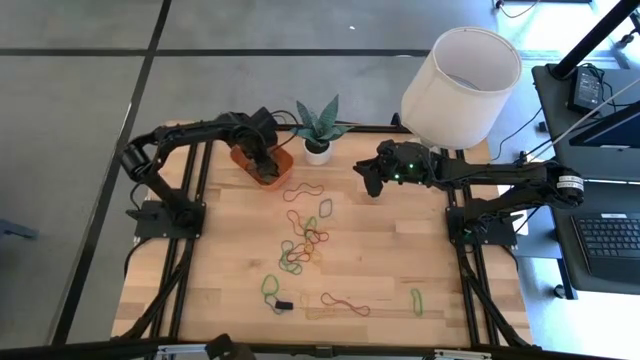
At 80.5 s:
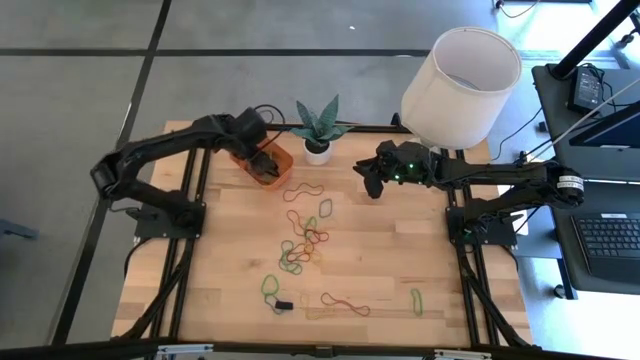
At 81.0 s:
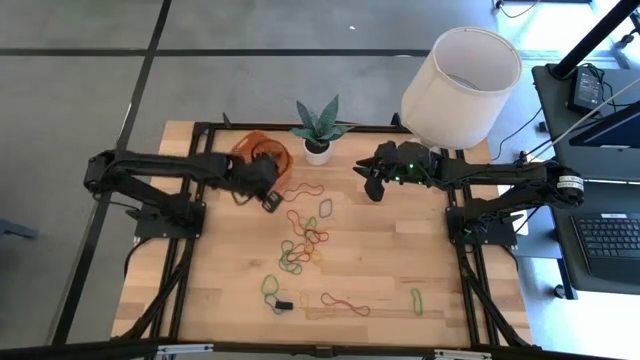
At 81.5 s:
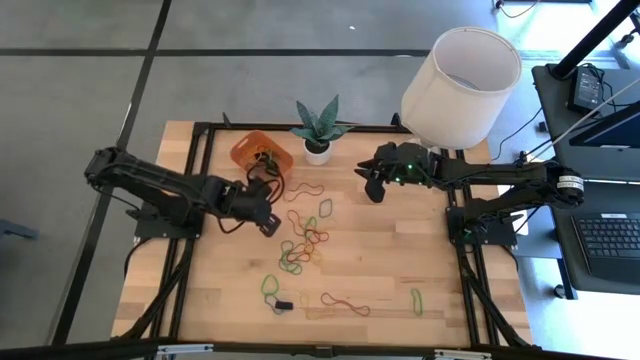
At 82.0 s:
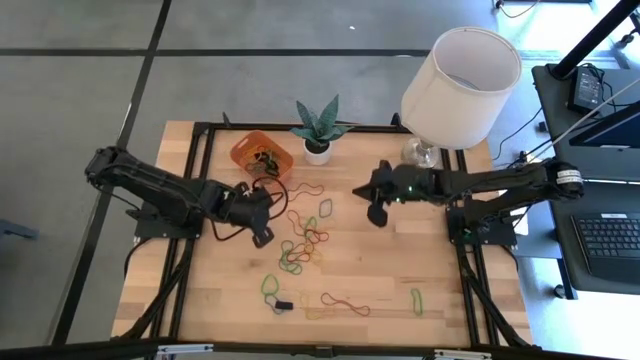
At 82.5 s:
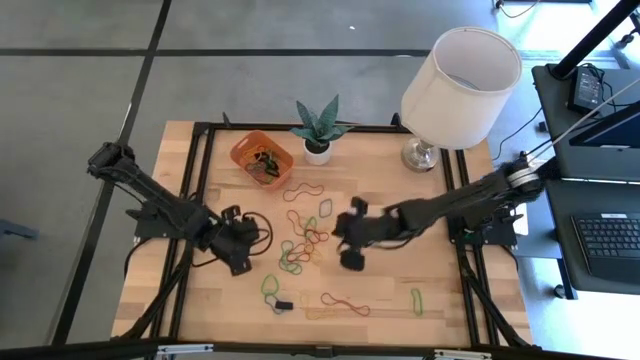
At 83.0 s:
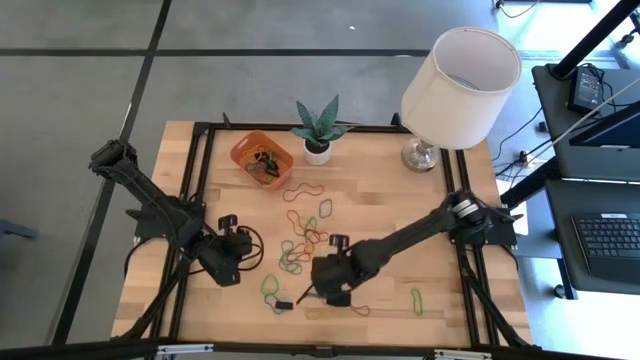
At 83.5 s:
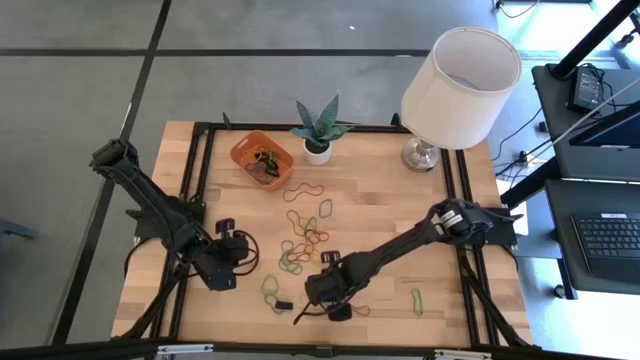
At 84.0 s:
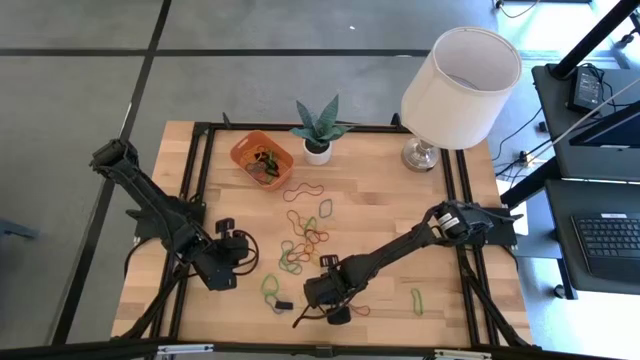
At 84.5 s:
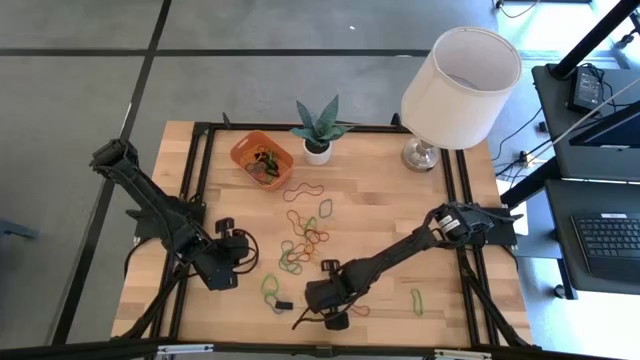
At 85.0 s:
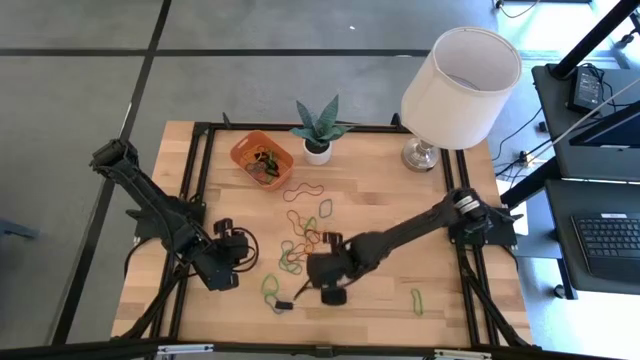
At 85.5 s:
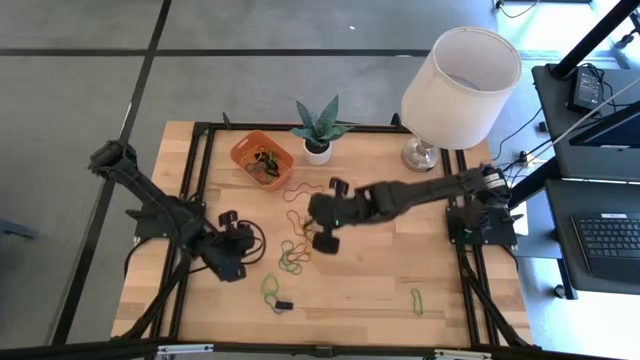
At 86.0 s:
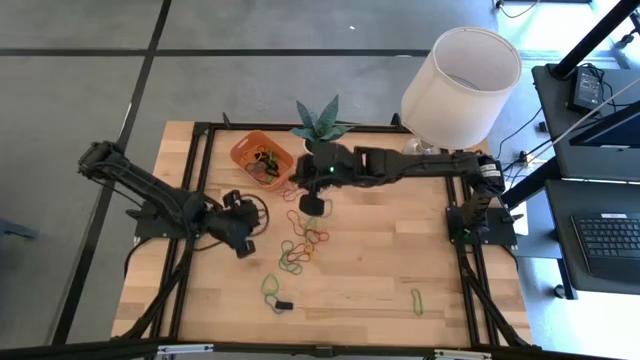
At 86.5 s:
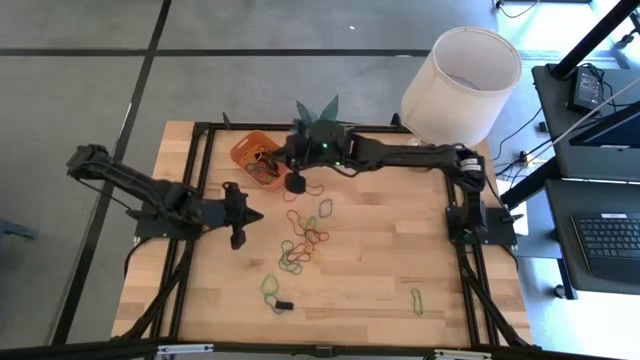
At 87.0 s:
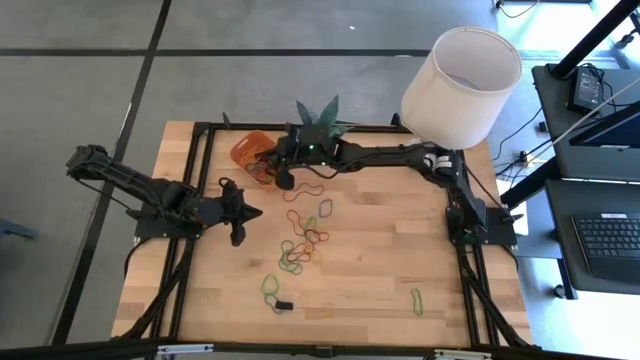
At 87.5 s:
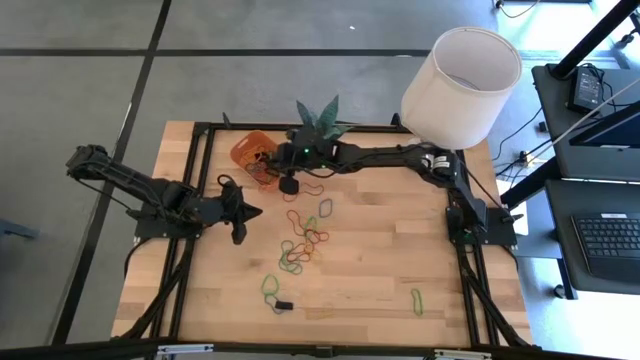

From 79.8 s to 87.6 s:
Task: Pick and place rubber bands into bin
Put the red rubber band into the orange bin

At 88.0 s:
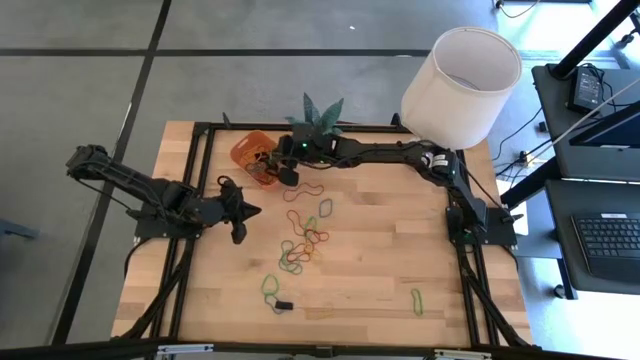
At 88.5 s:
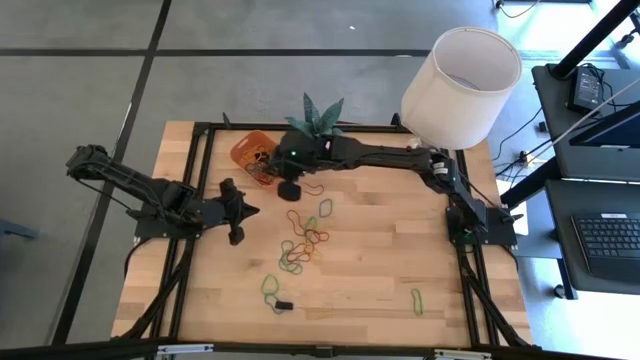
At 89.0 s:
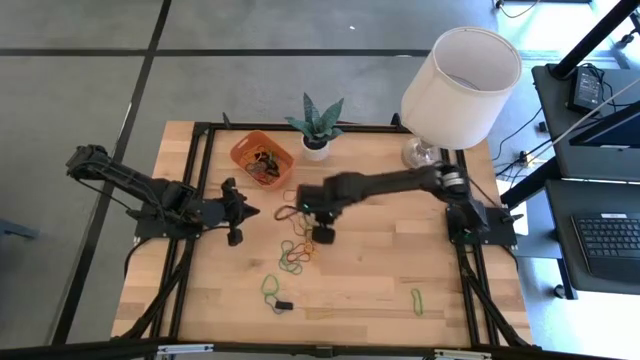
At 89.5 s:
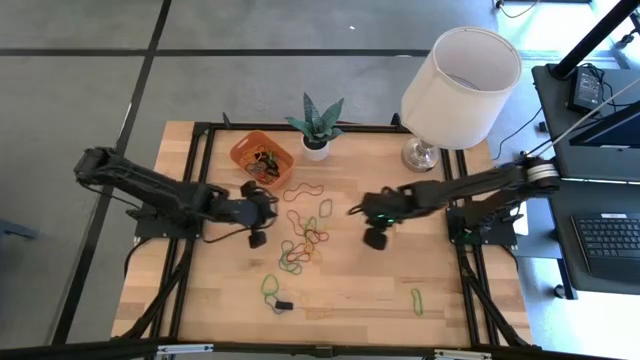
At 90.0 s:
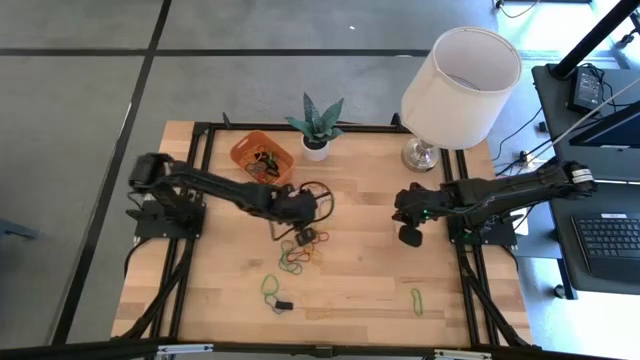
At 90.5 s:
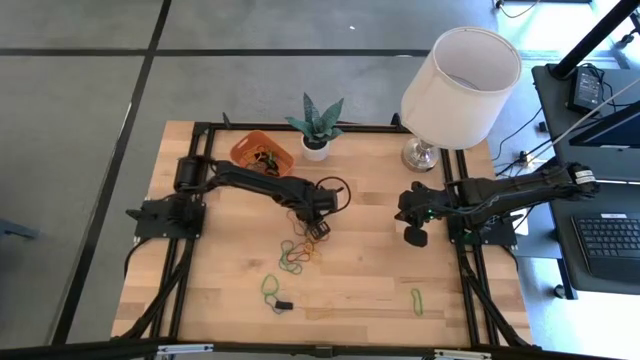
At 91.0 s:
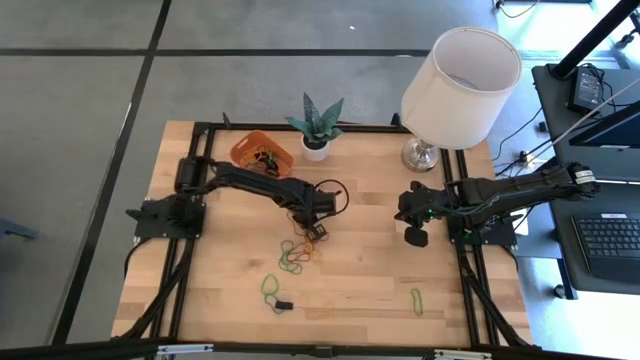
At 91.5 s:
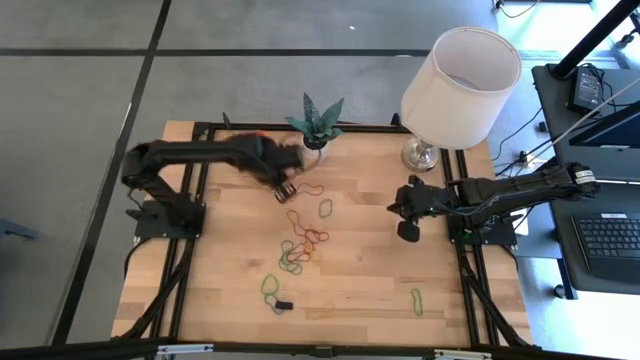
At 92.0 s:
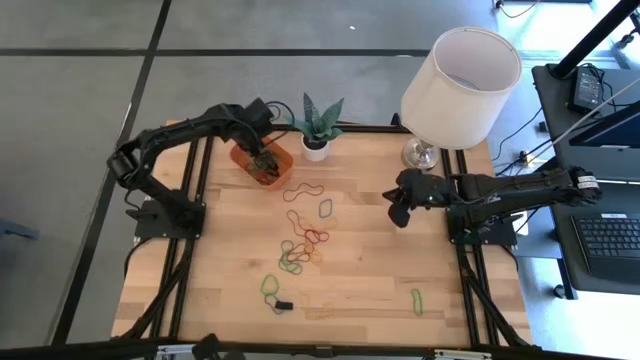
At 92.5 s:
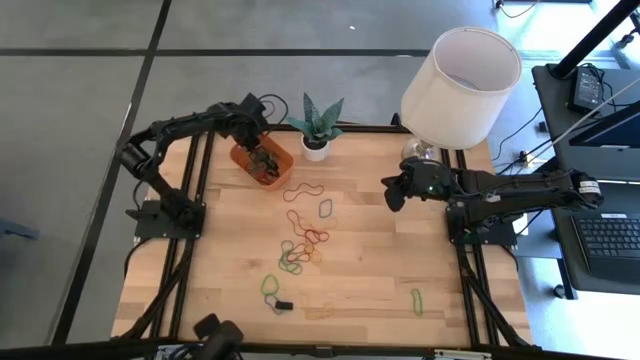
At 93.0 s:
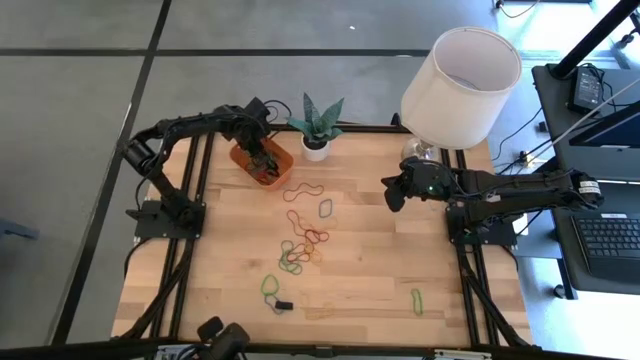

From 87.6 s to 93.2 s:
Put the green rubber band into the orange bin

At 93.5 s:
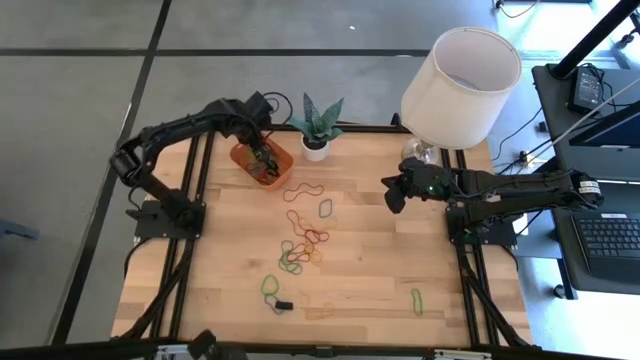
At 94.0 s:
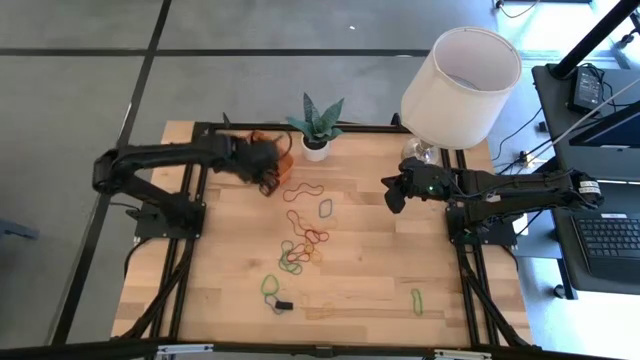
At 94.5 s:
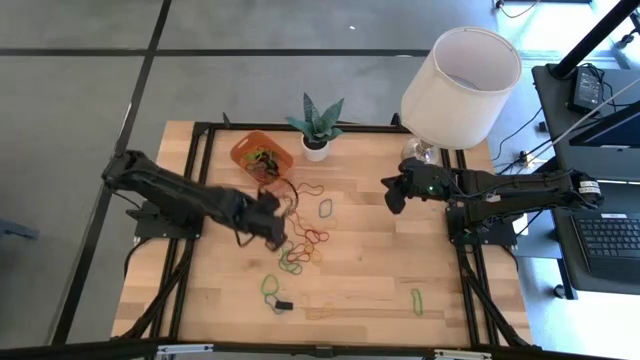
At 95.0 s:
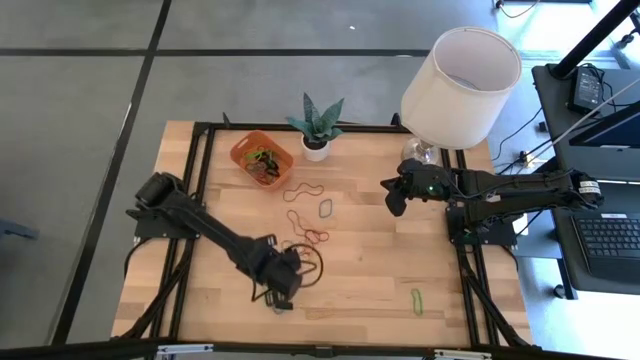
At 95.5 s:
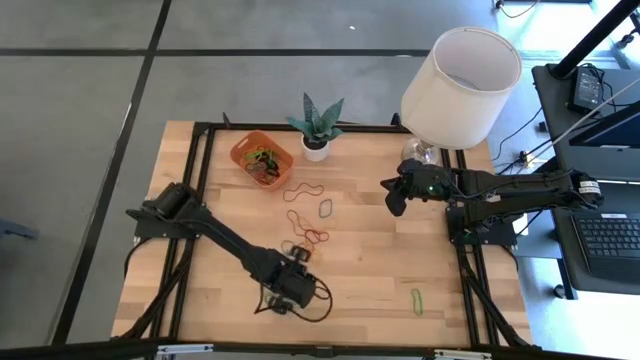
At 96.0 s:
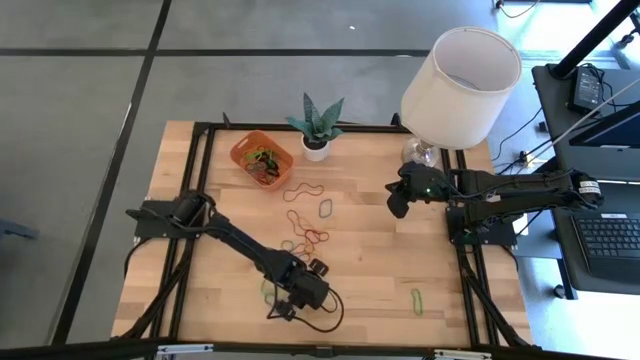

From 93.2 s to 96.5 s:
Put the yellow rubber band into the orange bin

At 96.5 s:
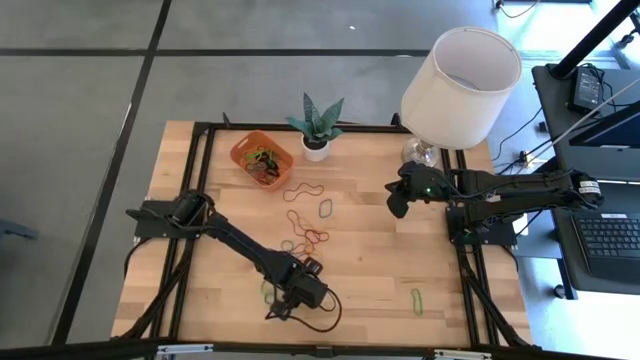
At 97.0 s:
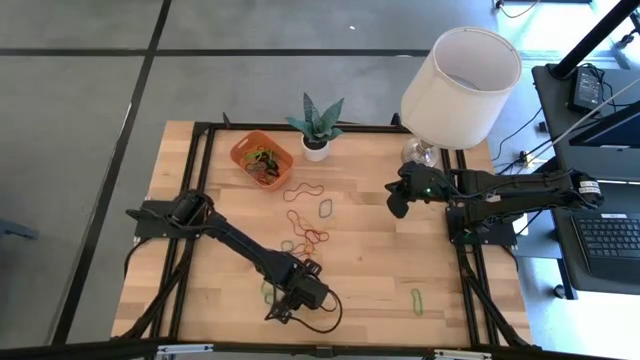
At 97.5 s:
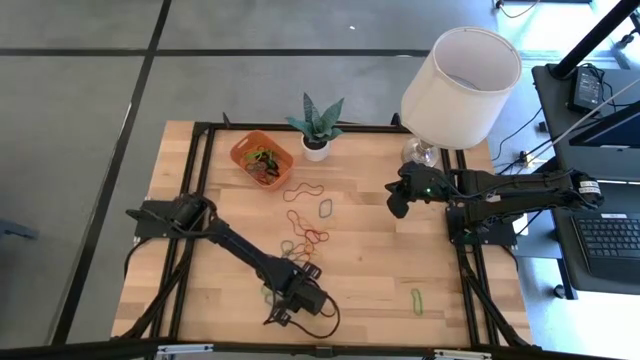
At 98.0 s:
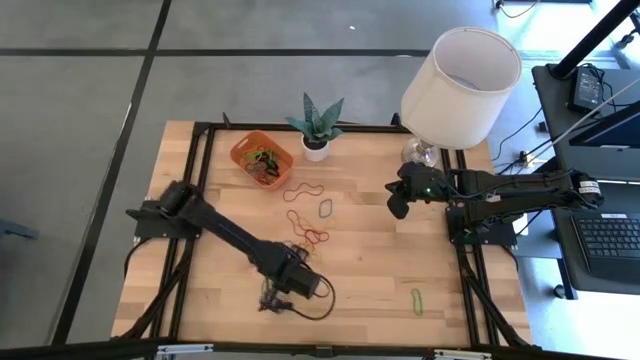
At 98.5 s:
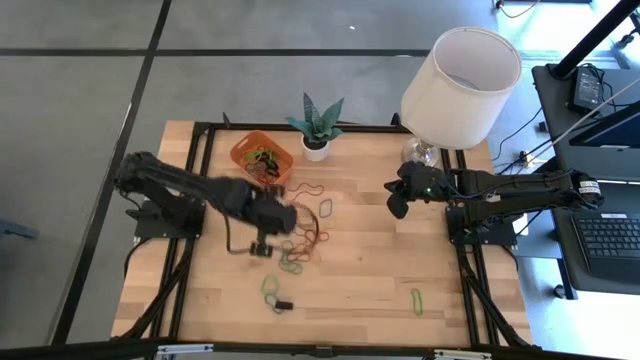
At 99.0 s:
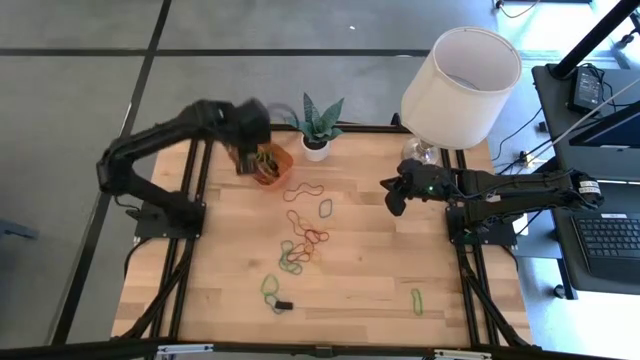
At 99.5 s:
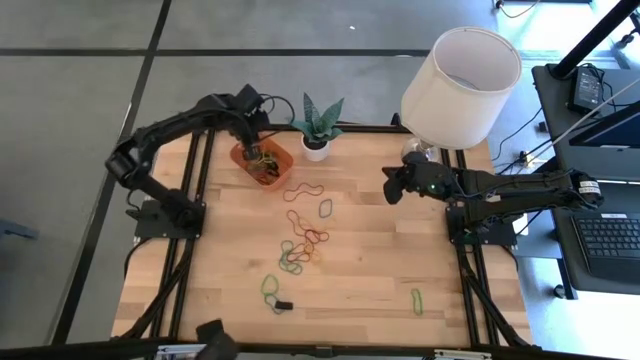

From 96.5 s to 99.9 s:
Put the yellow rubber band into the orange bin
